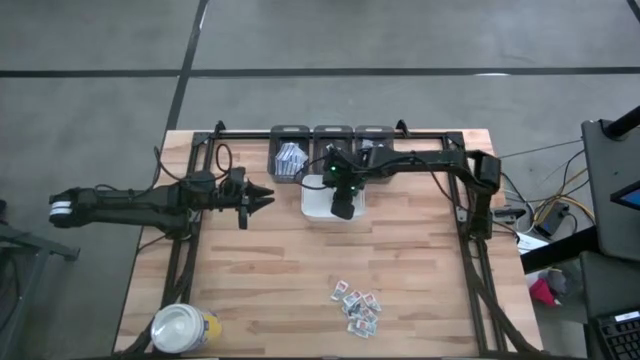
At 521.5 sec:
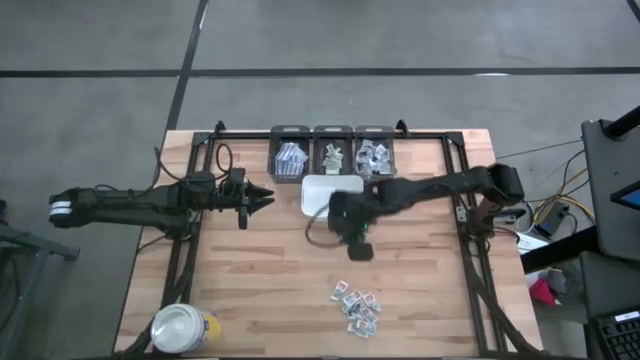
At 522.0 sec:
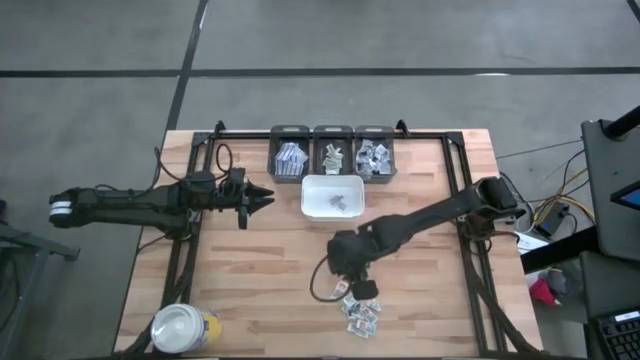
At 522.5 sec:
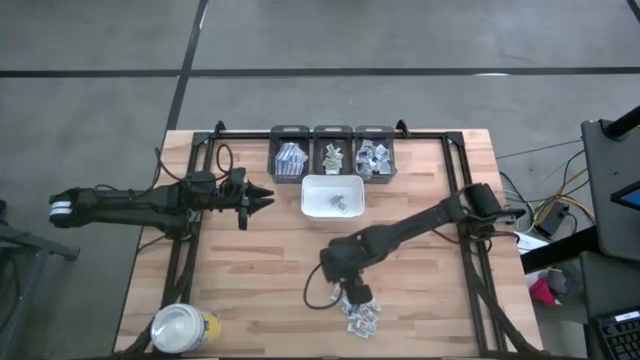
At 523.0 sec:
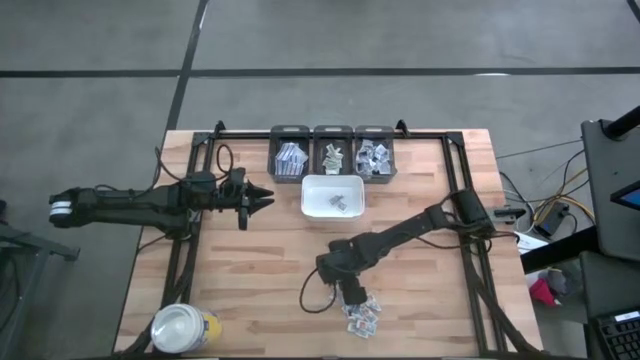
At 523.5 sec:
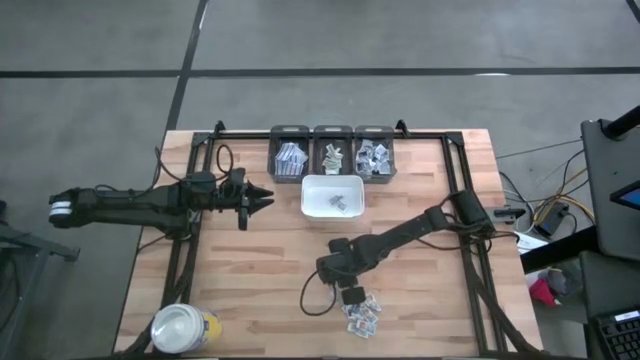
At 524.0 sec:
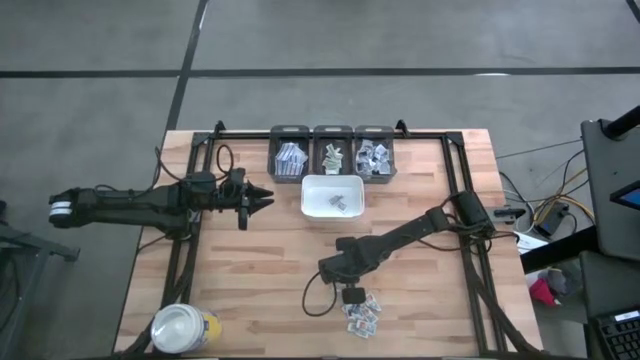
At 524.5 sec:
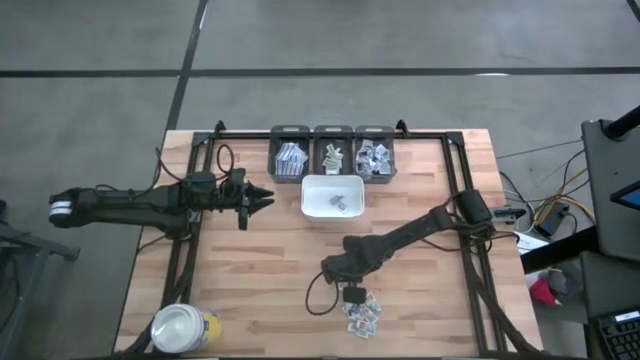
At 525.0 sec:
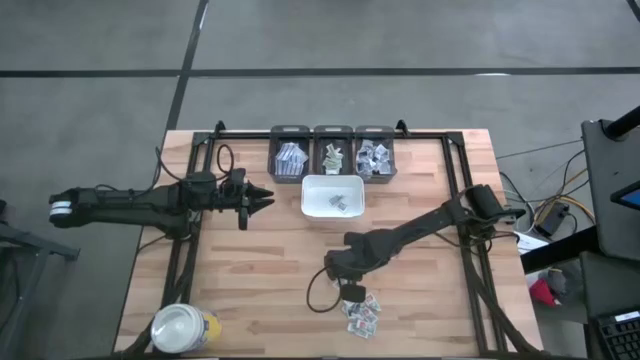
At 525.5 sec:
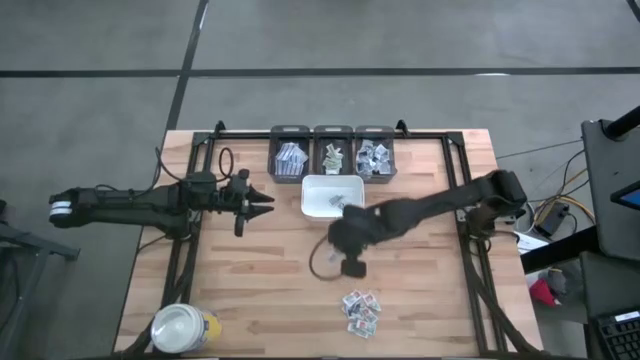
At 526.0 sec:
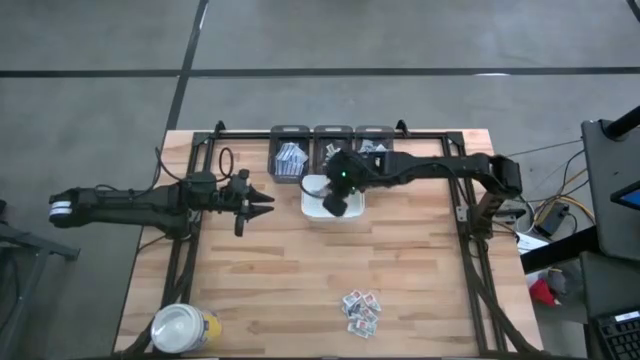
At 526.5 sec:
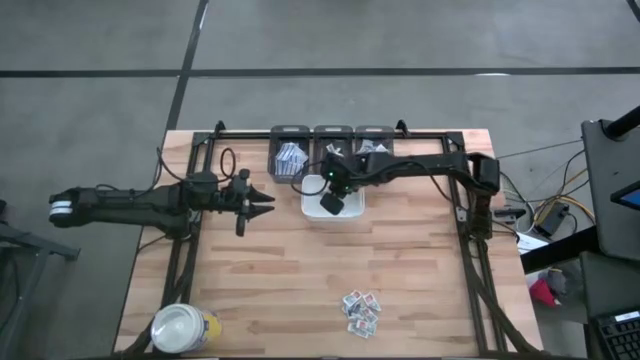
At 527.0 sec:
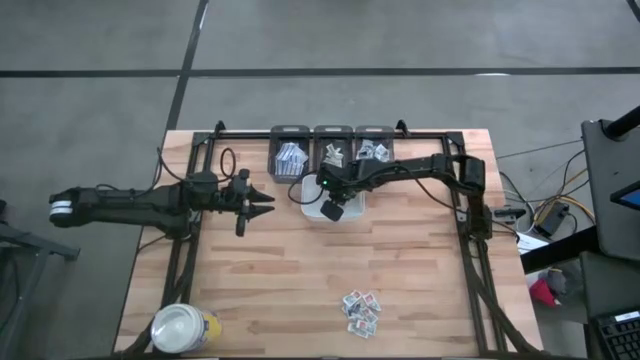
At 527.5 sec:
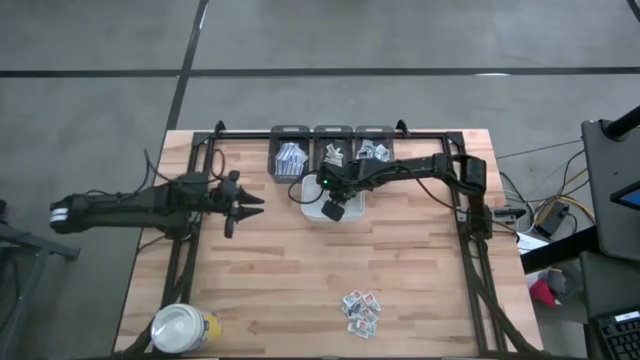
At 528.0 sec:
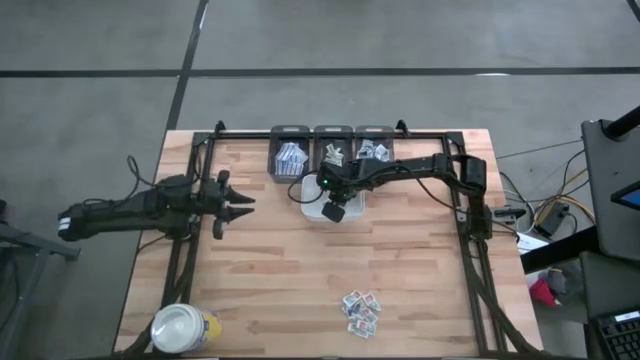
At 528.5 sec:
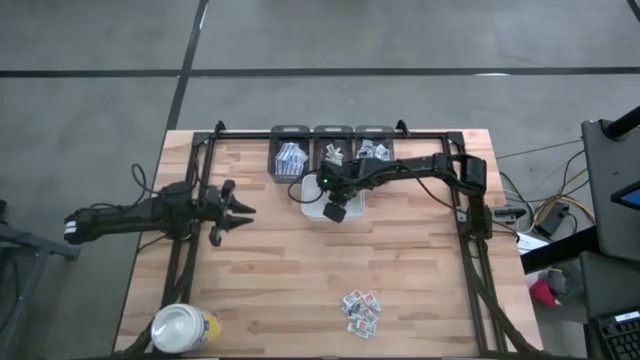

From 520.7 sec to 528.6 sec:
Task: Pick & Place First Aid Supplies
Put the orange ointment pack into the white bin

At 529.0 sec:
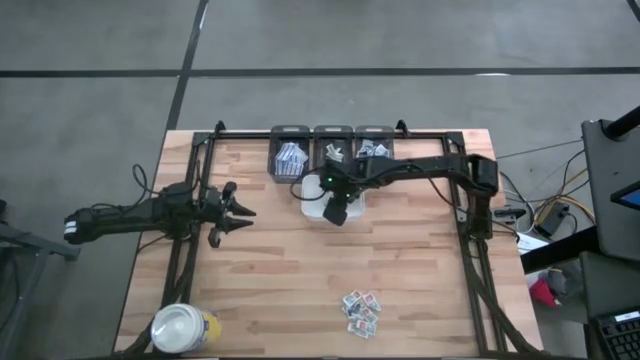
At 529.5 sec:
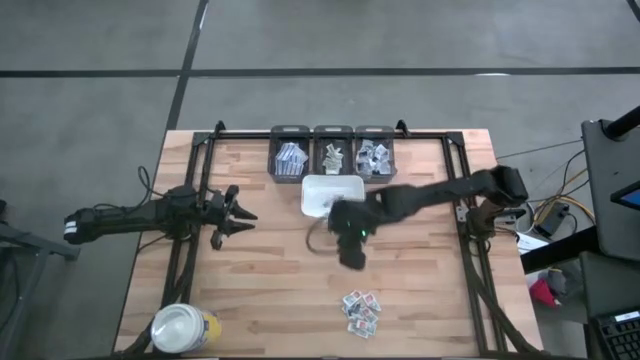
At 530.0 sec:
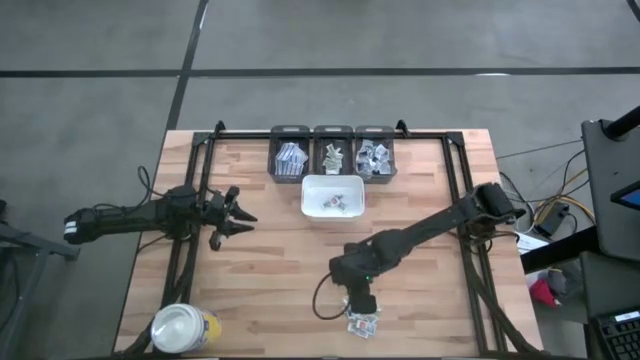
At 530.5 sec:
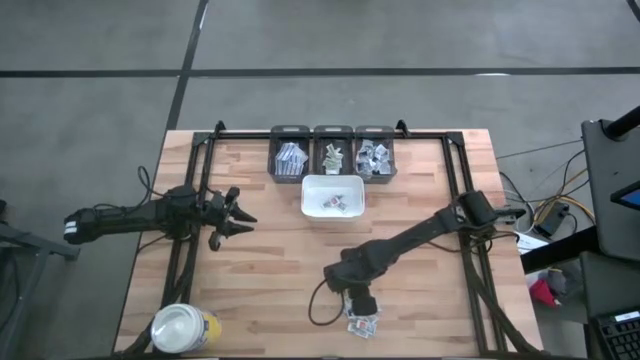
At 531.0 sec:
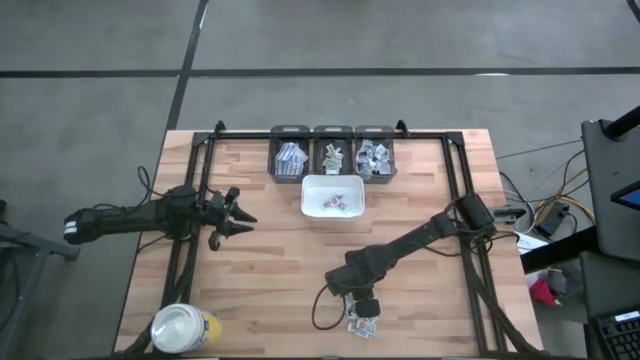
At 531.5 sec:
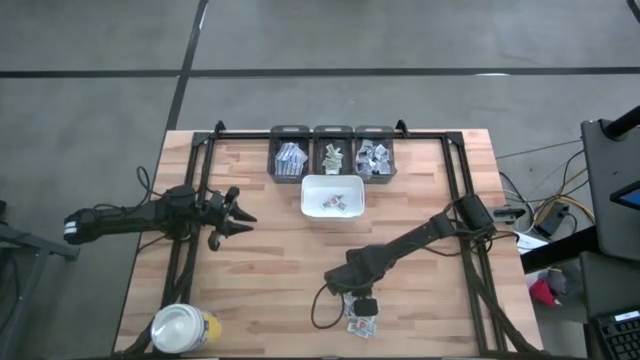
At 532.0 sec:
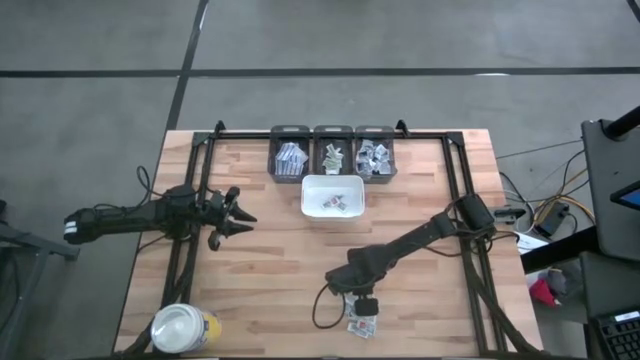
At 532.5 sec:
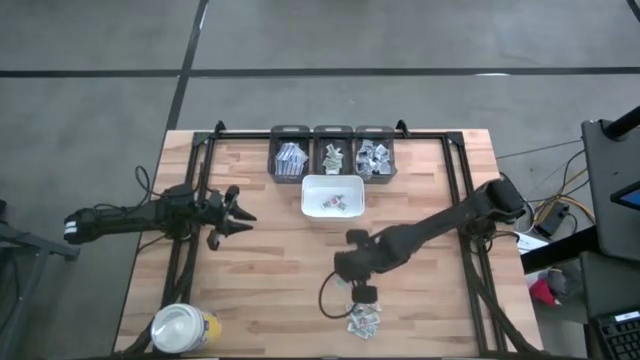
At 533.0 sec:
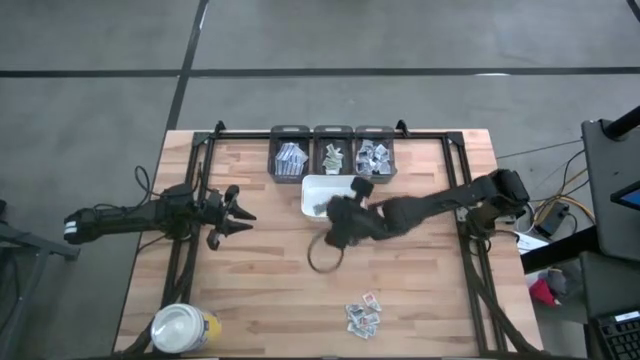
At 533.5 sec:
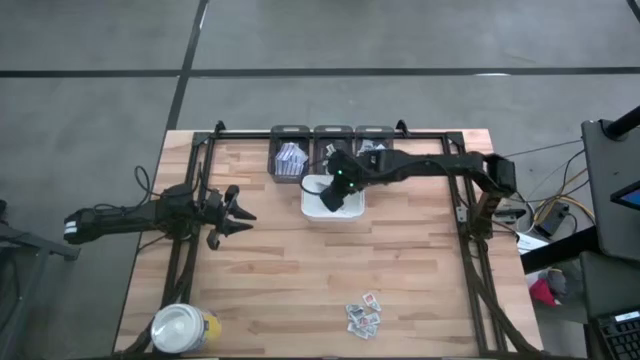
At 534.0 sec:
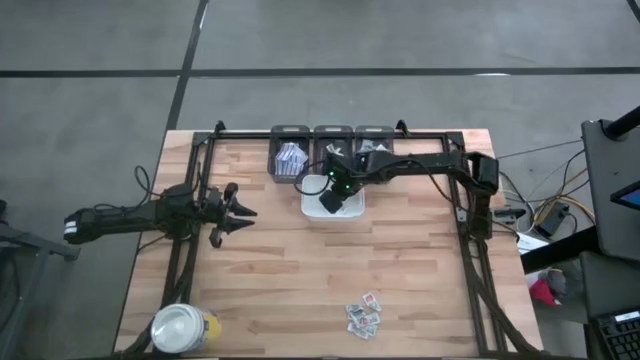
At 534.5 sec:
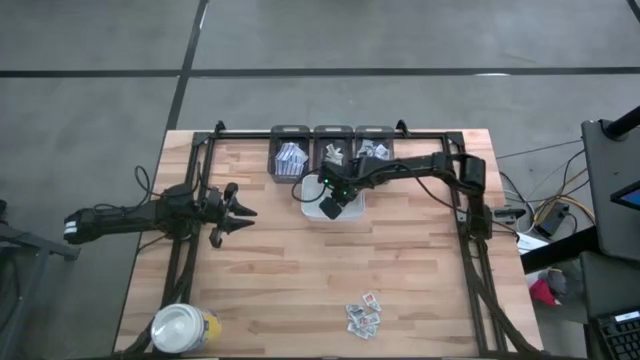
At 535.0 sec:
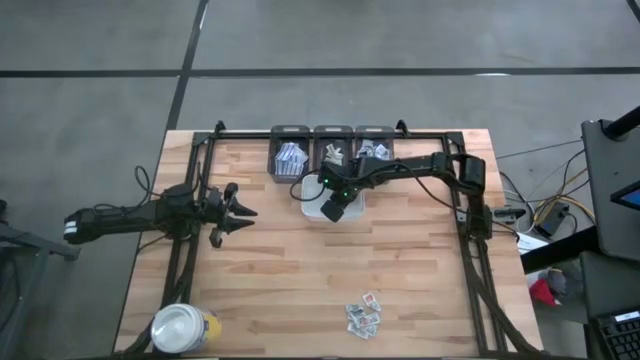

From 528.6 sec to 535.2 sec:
Put the orange ointment pack into the white bin

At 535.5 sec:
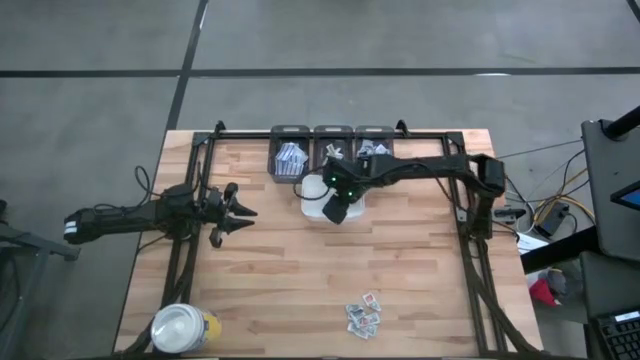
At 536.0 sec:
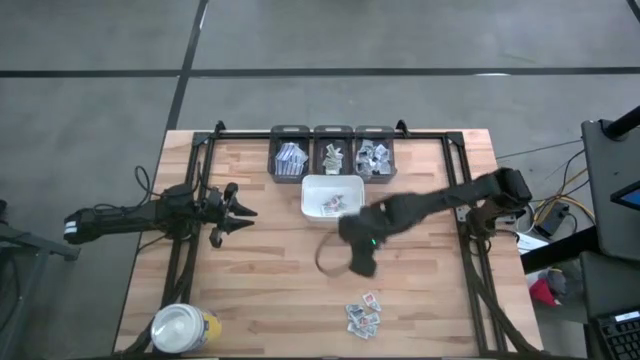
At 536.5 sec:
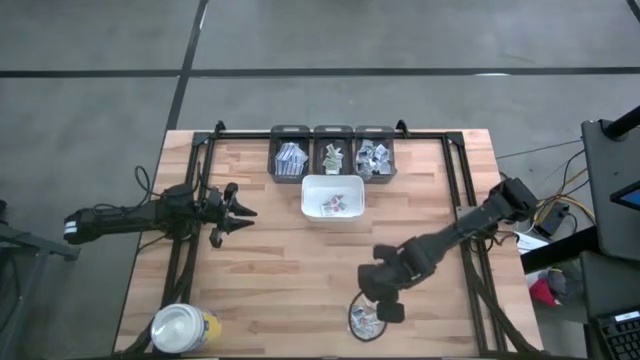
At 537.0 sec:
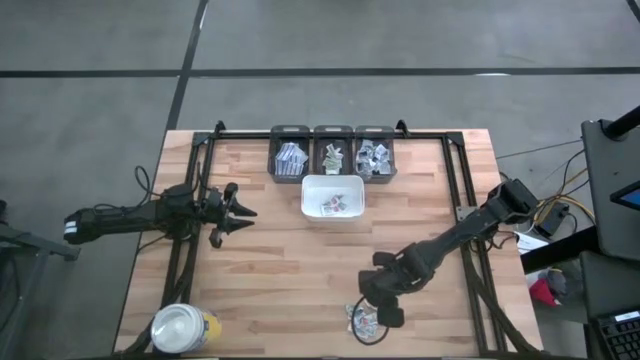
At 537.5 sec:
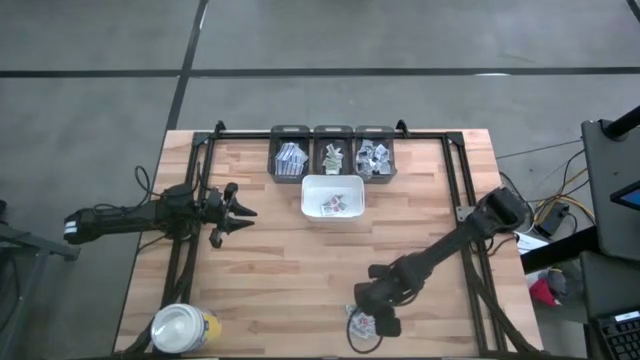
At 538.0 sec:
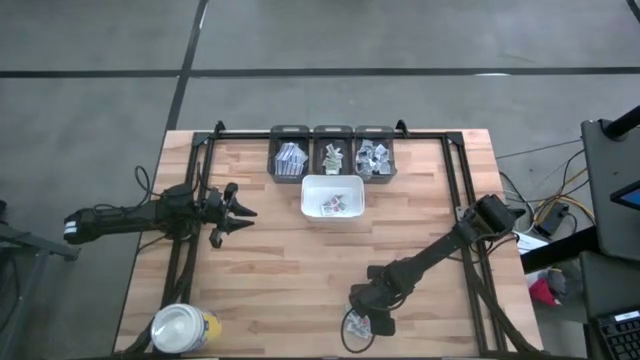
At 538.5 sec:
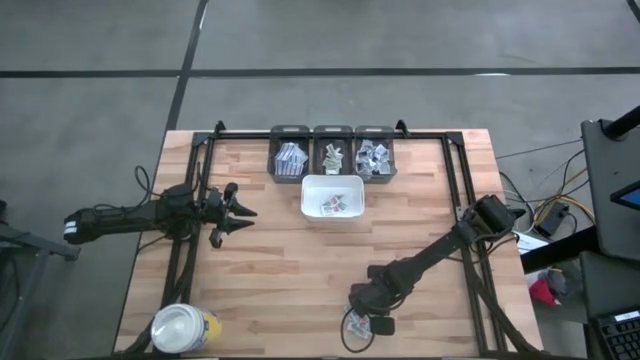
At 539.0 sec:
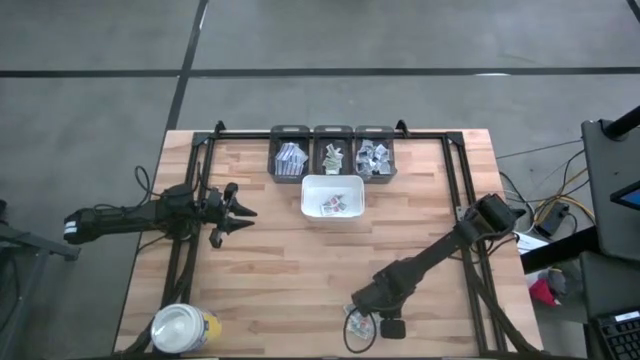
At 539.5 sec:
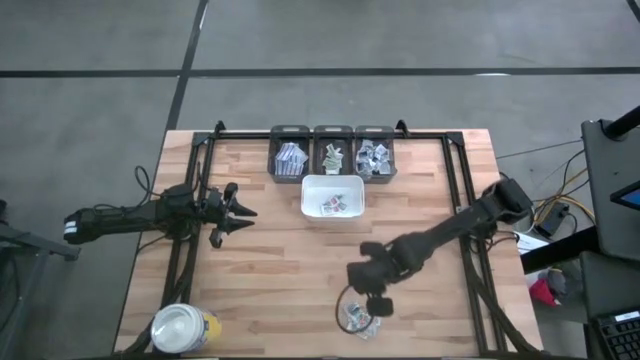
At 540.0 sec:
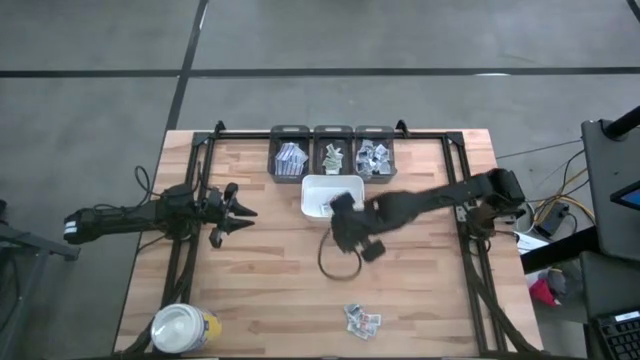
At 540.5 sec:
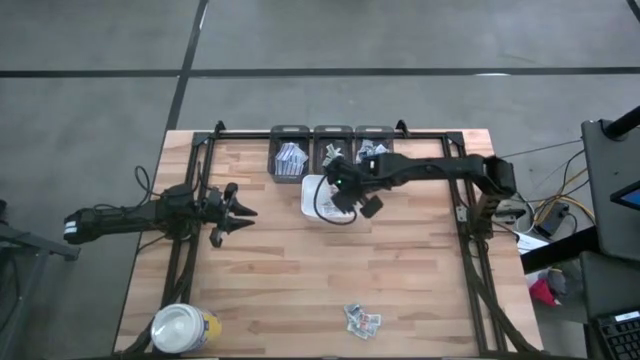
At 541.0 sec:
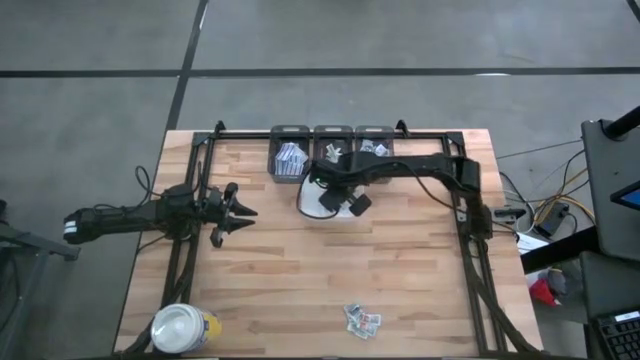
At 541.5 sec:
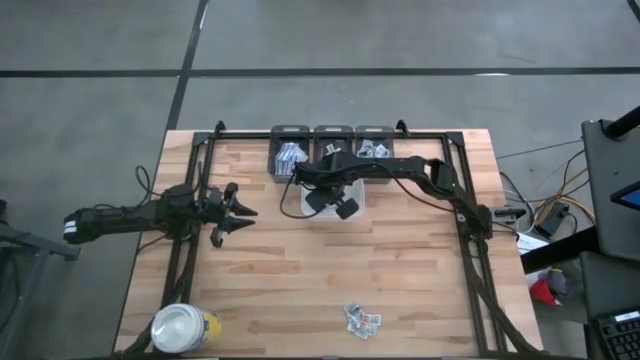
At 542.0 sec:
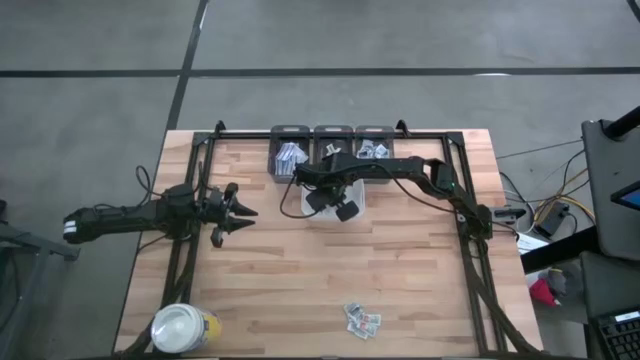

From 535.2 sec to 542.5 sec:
Put the orange ointment pack into the white bin
